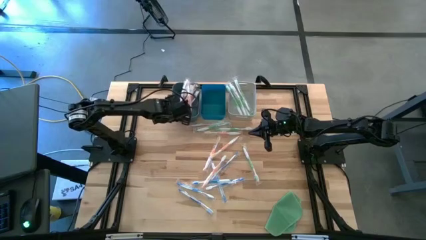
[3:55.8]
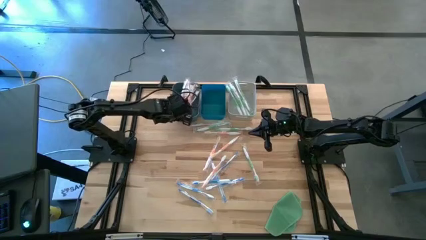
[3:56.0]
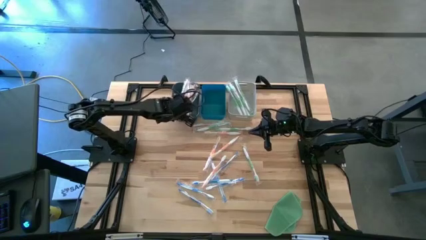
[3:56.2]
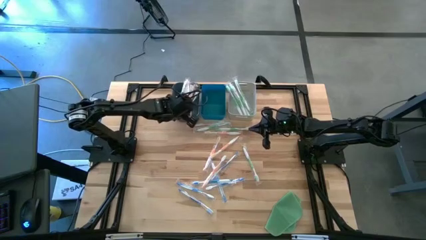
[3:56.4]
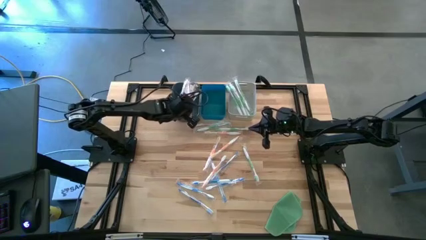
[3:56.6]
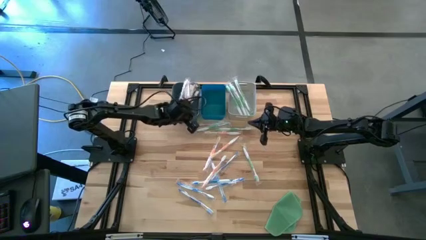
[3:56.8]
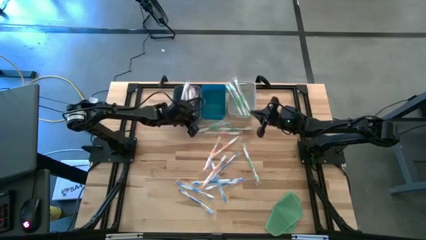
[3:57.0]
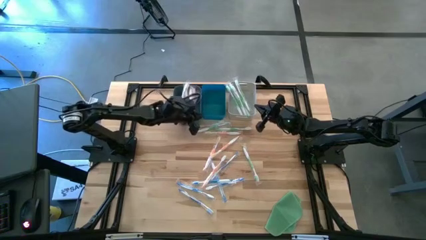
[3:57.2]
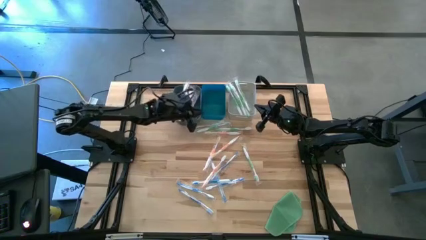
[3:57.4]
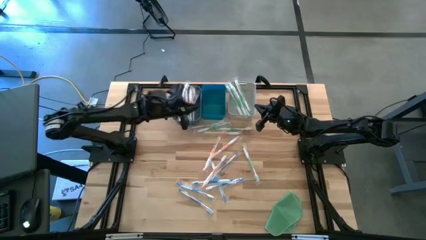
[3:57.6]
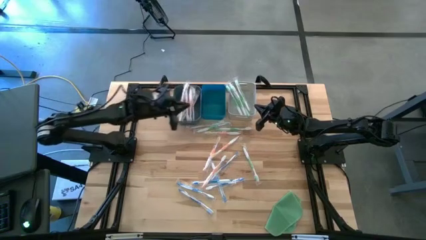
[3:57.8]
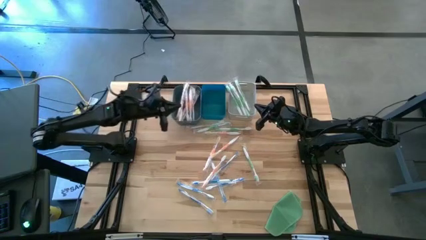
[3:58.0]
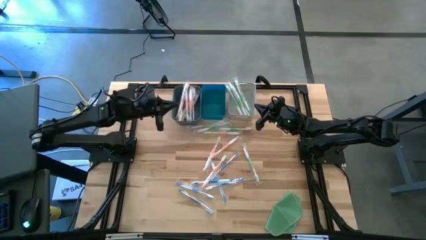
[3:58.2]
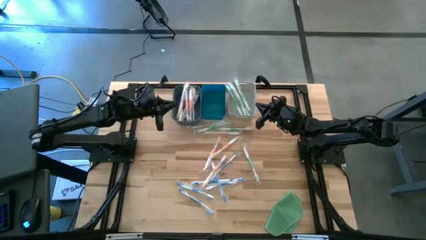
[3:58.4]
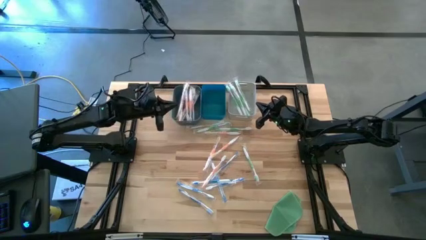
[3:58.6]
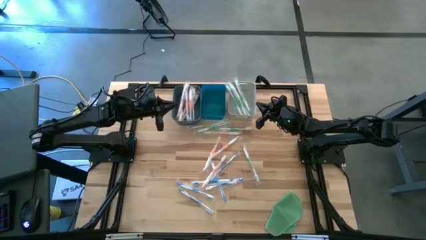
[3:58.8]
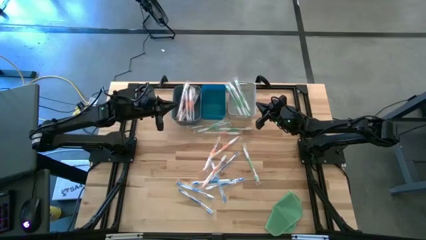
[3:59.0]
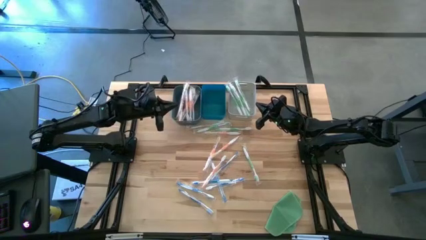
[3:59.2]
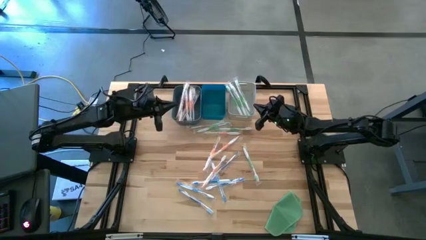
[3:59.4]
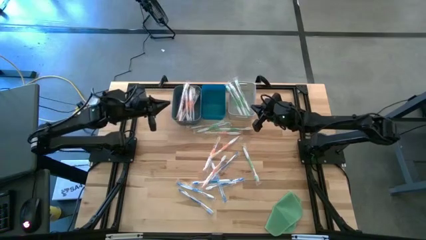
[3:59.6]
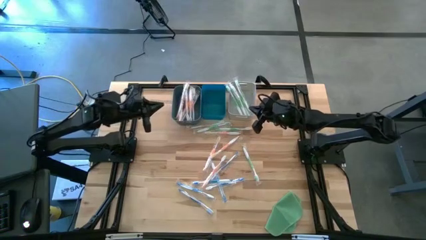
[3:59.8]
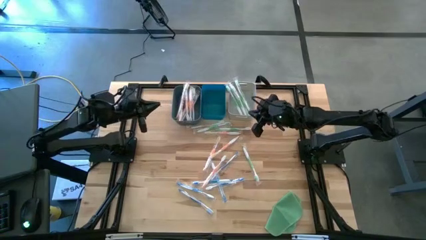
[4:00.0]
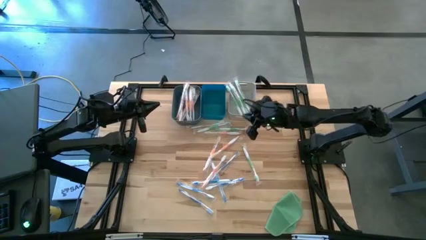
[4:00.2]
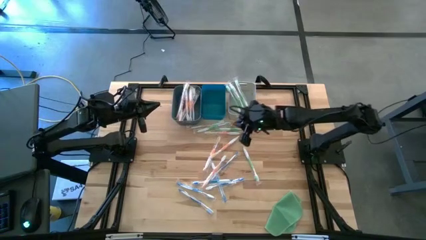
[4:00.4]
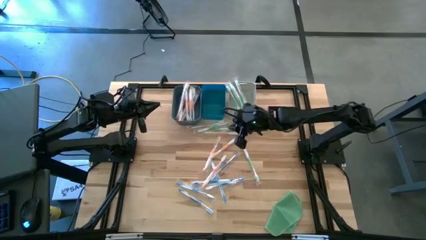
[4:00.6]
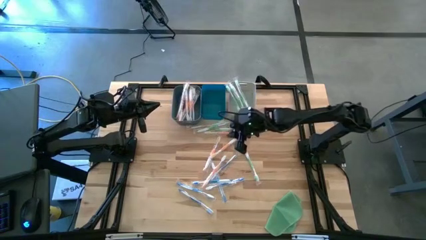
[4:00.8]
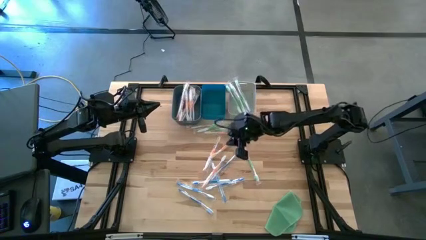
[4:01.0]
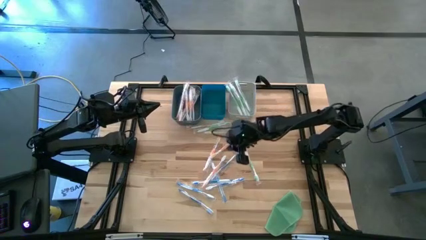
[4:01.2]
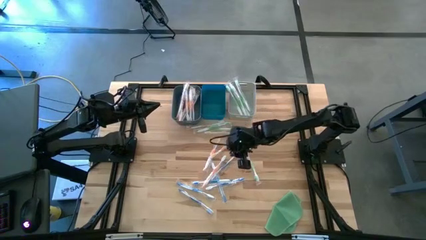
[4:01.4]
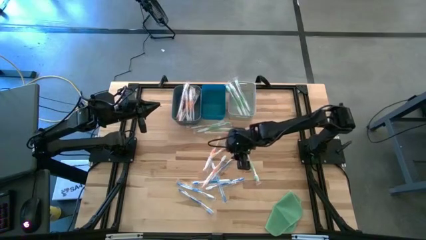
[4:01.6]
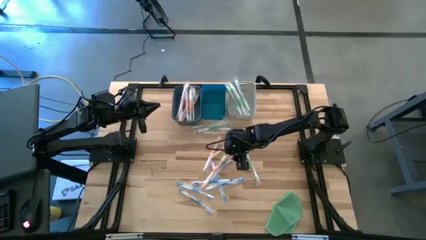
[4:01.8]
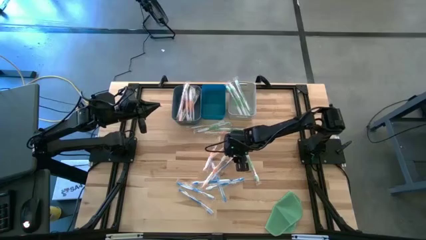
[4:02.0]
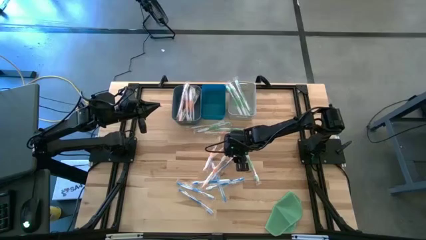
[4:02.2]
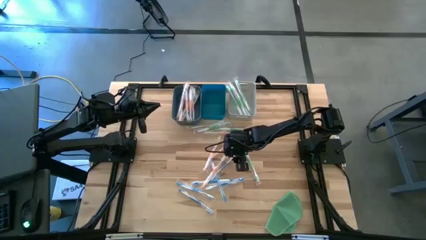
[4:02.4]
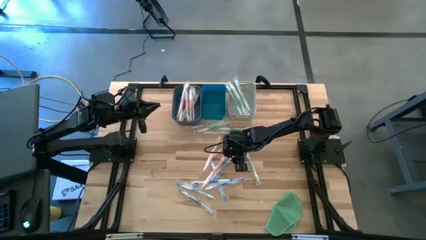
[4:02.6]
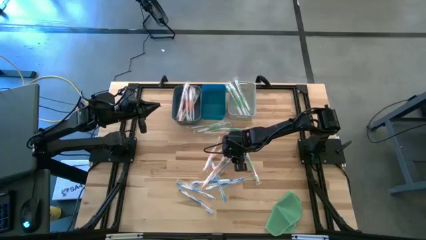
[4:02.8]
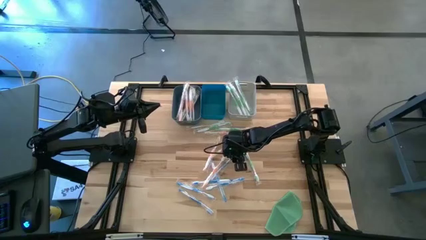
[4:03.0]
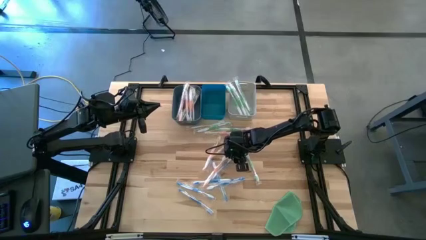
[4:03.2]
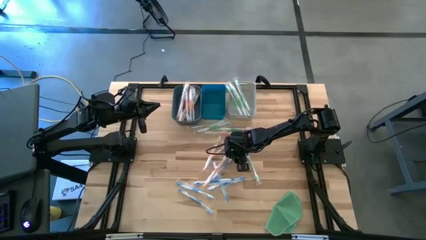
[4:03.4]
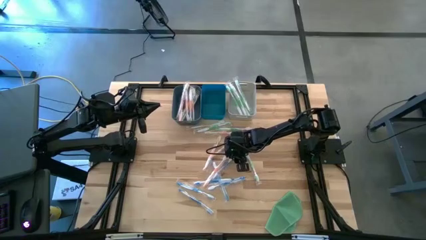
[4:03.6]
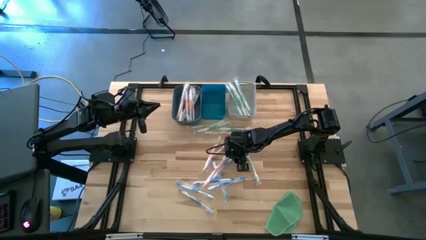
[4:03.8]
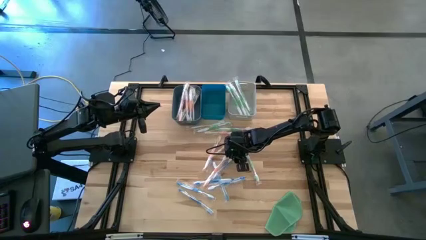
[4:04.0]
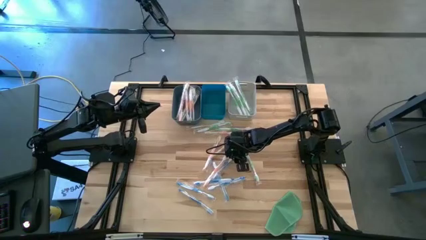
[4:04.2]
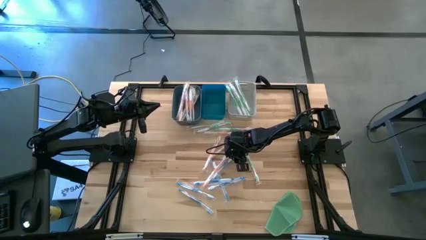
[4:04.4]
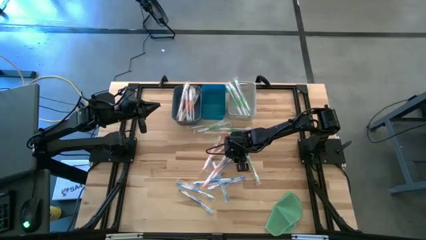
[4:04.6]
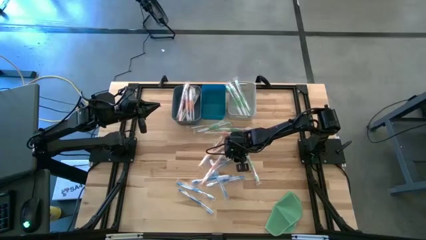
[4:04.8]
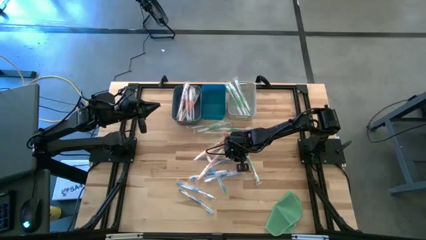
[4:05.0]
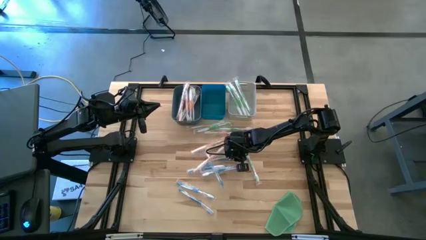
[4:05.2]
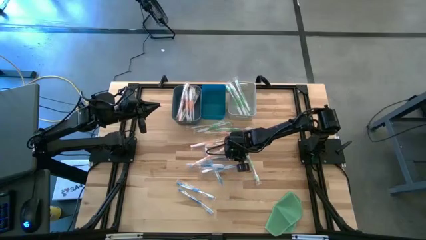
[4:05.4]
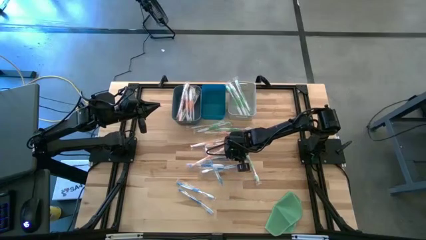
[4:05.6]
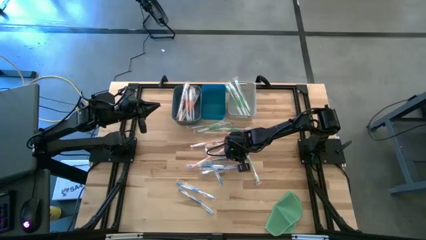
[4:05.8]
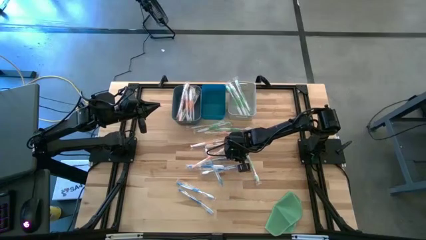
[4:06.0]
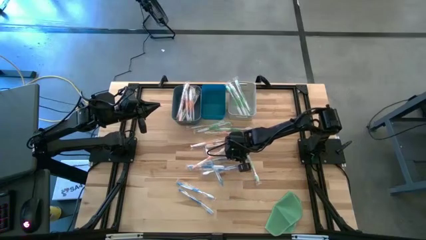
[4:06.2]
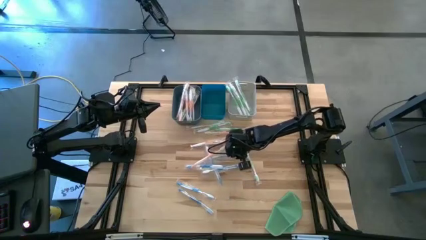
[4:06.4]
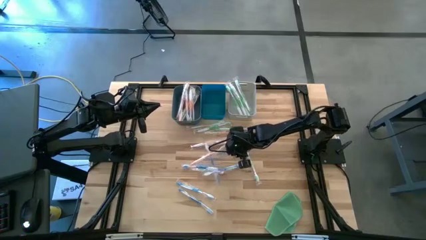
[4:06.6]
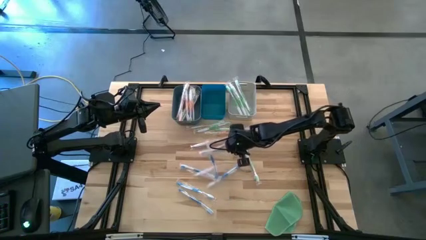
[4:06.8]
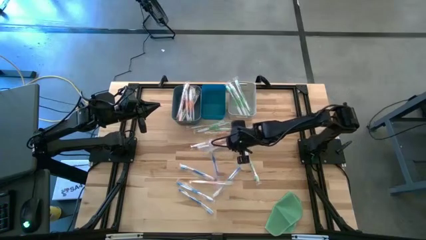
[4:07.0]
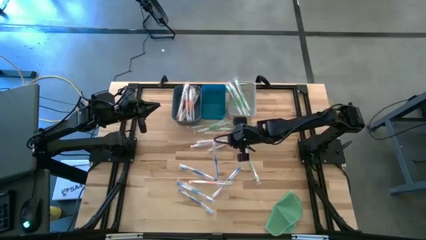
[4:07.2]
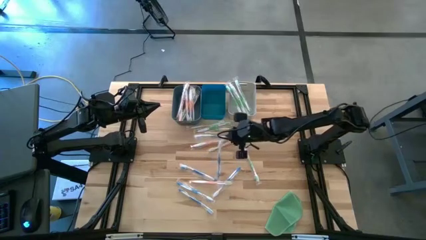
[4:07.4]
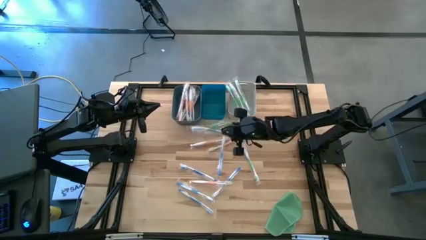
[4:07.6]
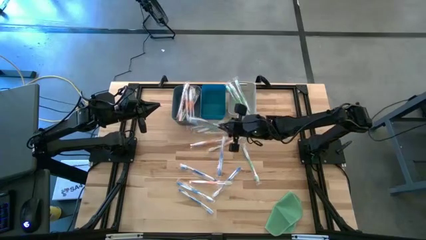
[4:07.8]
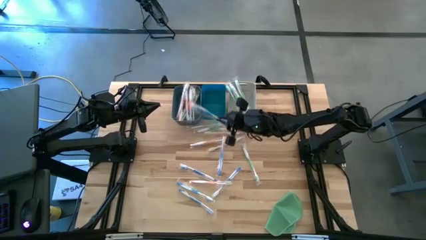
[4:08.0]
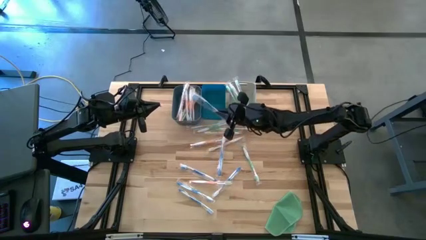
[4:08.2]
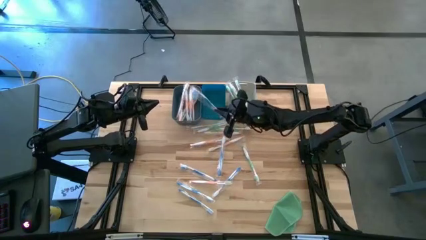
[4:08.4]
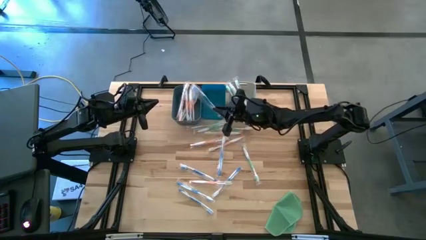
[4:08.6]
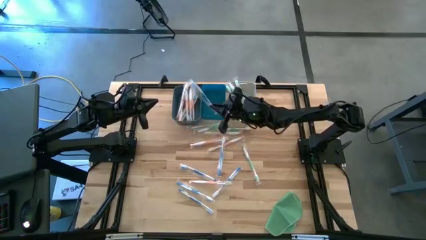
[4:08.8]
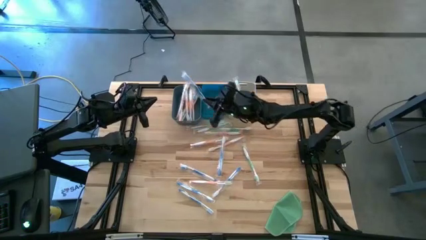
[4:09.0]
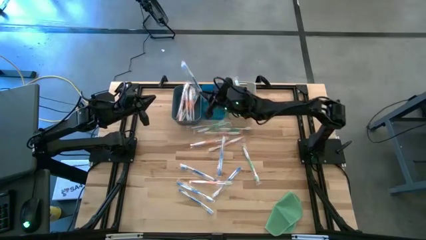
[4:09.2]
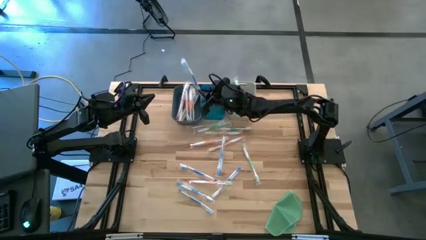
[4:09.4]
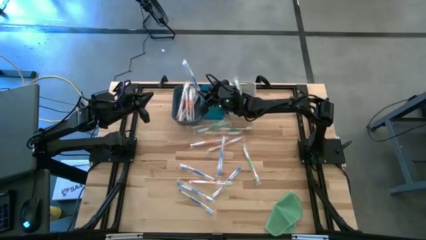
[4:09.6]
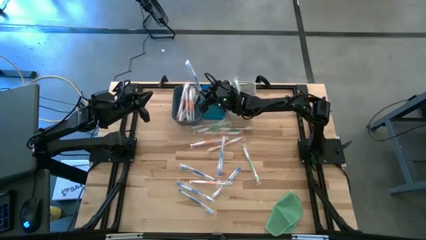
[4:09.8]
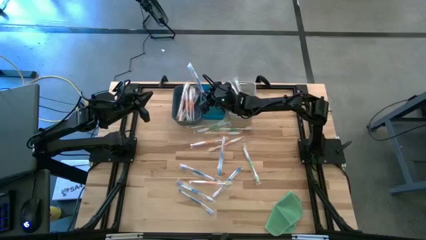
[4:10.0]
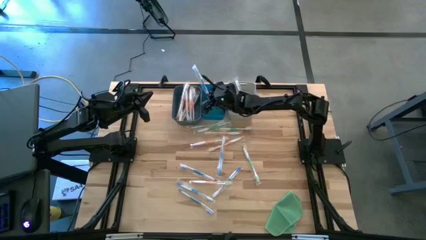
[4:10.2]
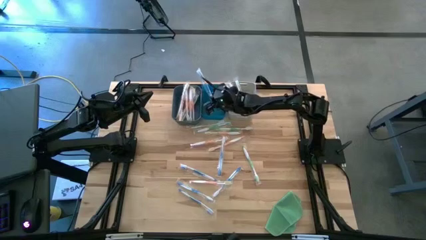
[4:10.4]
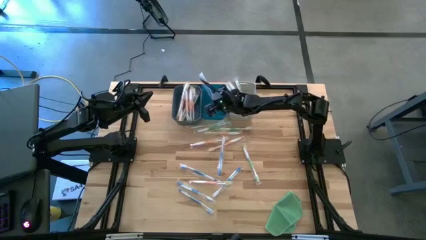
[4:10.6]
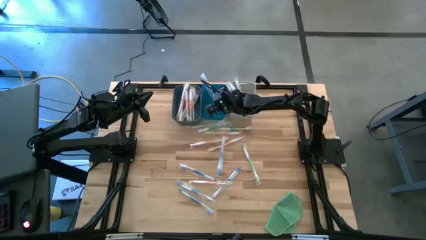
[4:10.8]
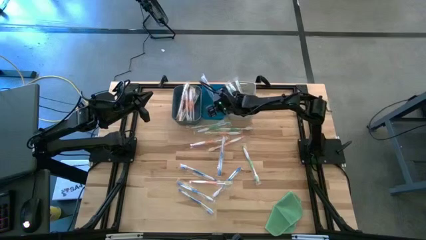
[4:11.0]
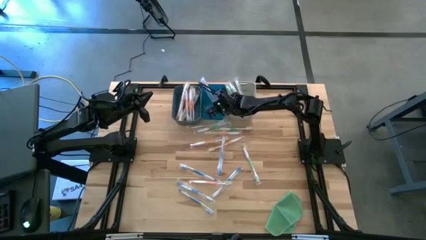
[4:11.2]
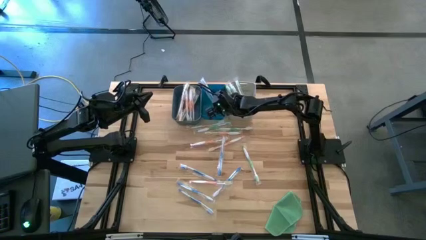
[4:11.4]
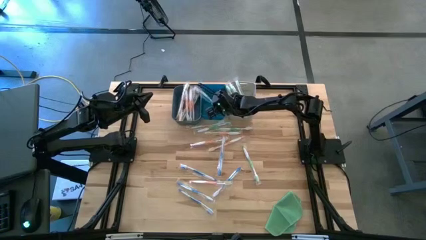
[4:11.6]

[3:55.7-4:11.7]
Task: Pick & Place Toothbrushes
Put the blue toothbrush into the blue bin

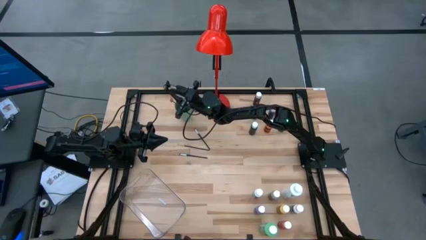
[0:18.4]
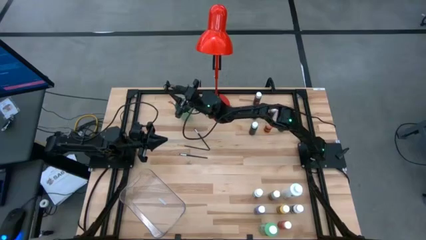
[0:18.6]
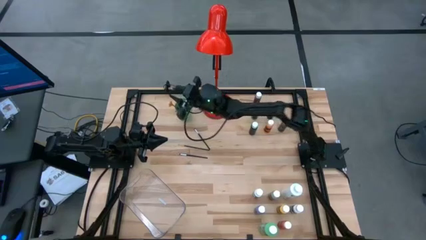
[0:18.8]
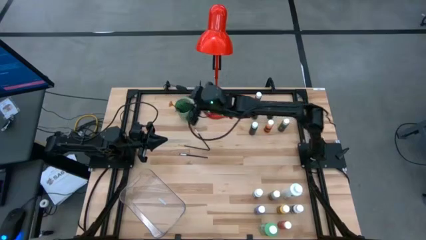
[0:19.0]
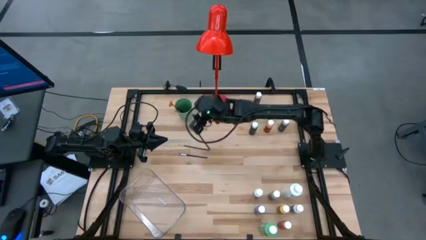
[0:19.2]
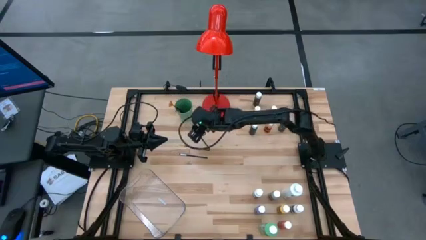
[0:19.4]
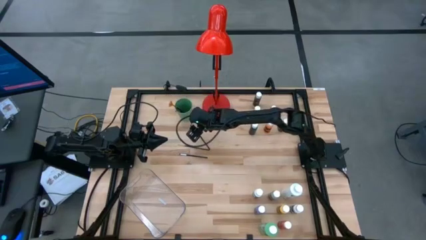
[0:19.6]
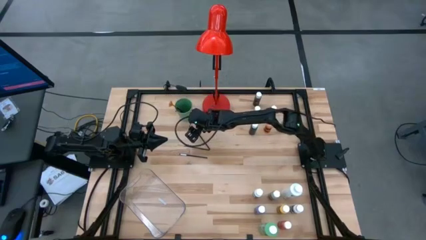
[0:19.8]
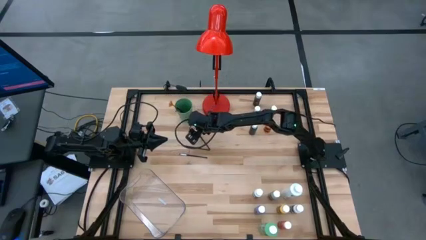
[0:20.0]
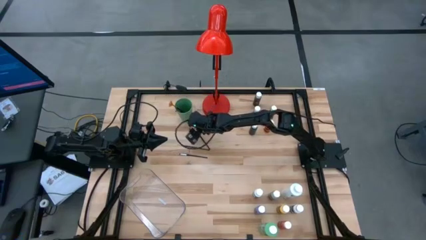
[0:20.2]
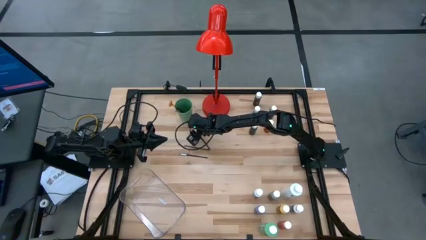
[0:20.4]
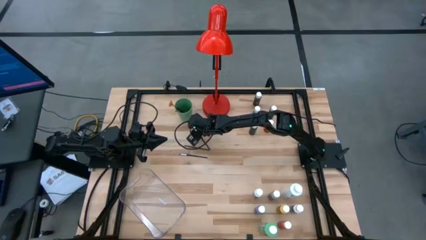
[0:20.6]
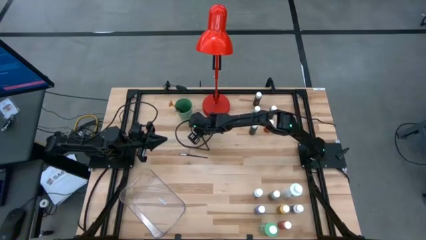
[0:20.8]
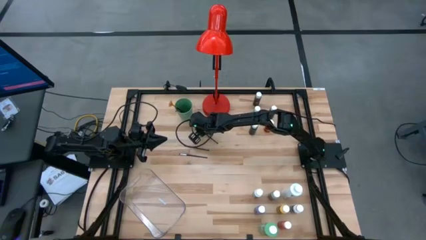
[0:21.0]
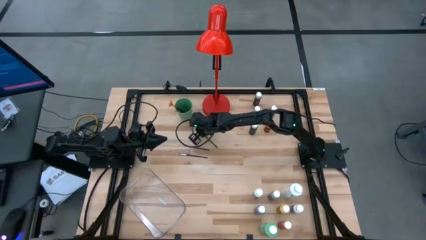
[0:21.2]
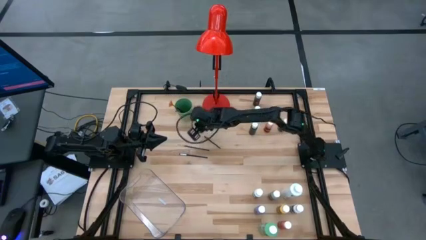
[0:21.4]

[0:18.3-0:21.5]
Task: Pick & Place Paint Supplies
Put the silver paint brush into the green cup
